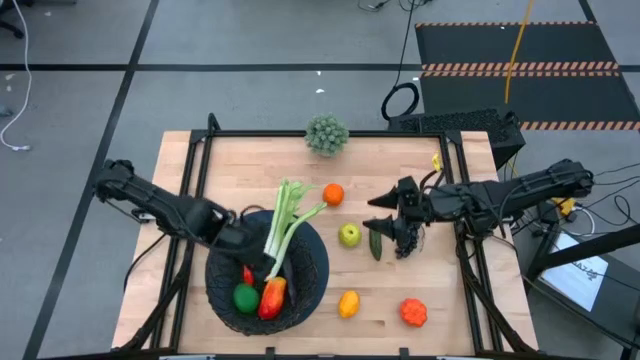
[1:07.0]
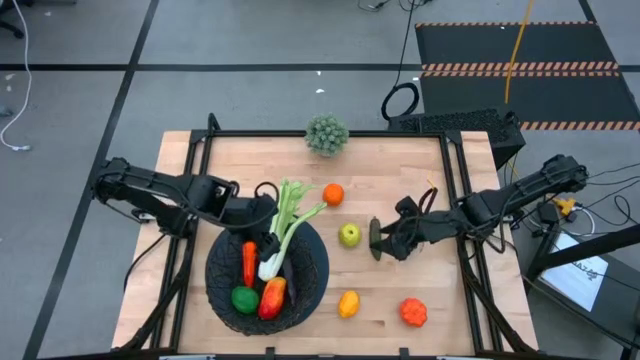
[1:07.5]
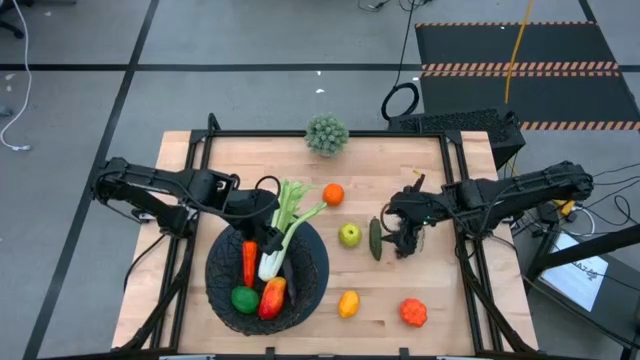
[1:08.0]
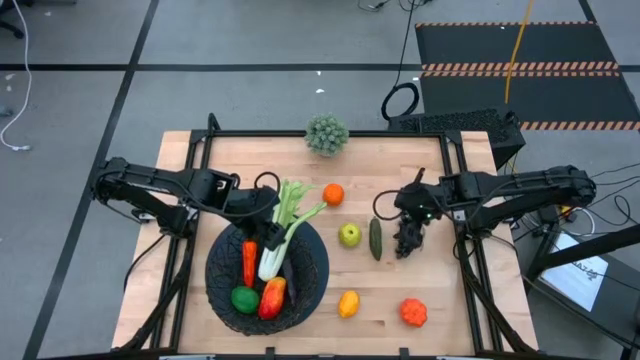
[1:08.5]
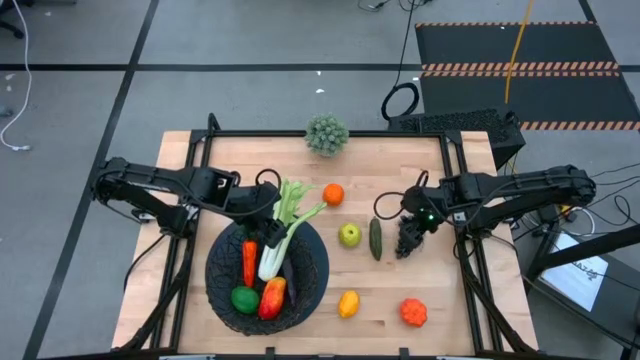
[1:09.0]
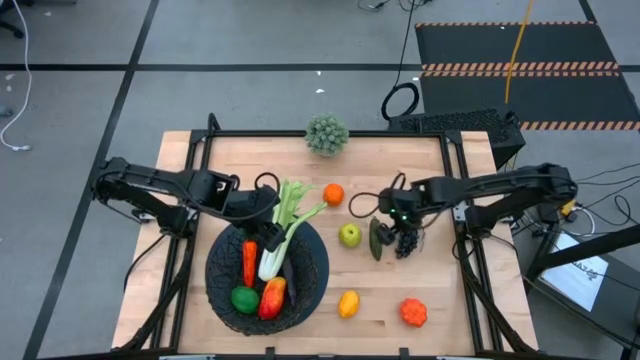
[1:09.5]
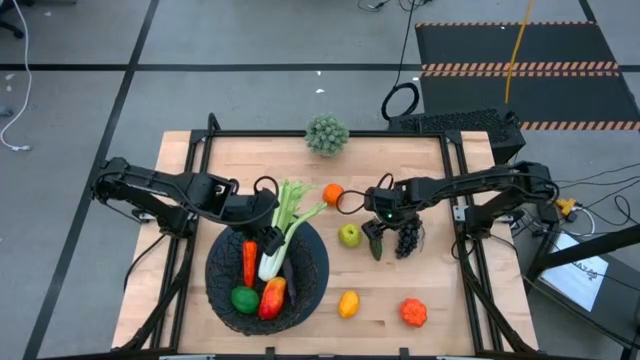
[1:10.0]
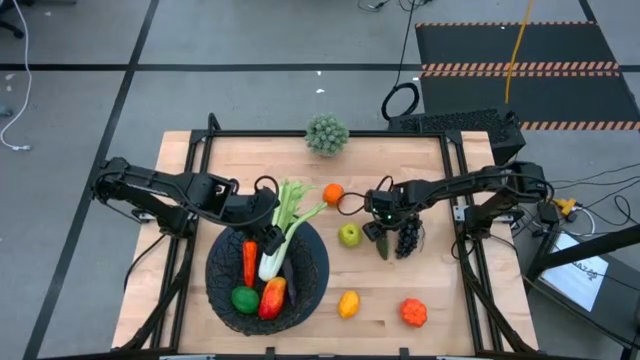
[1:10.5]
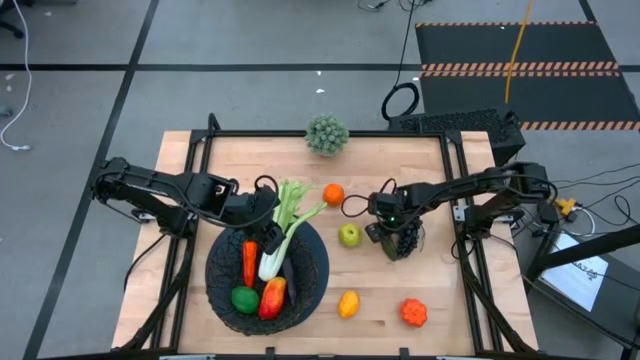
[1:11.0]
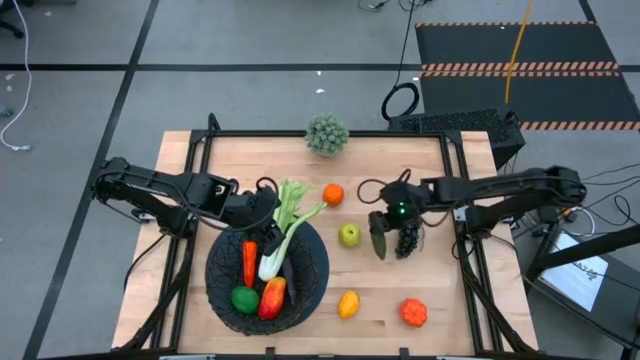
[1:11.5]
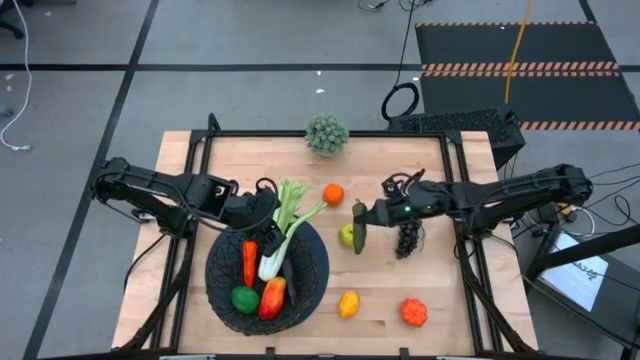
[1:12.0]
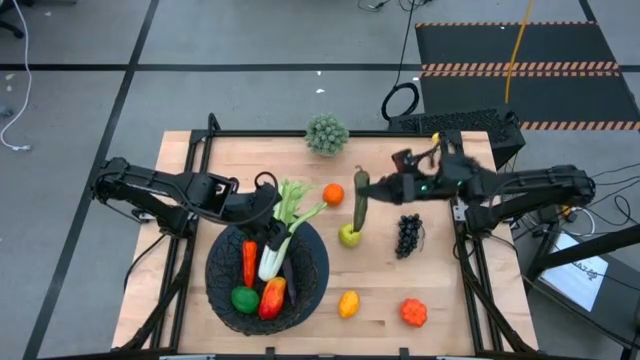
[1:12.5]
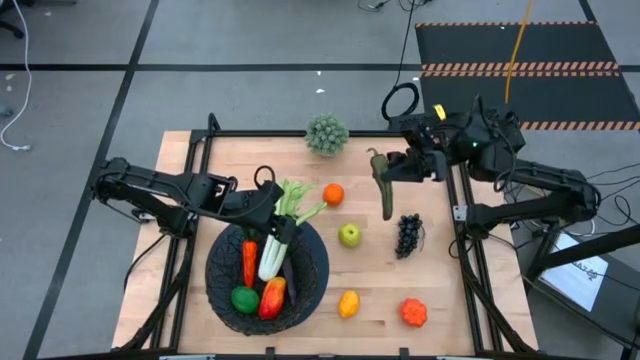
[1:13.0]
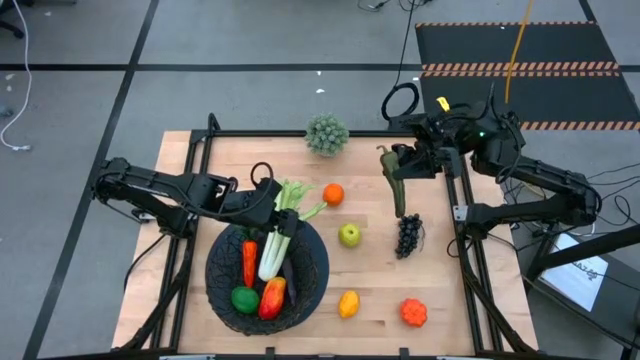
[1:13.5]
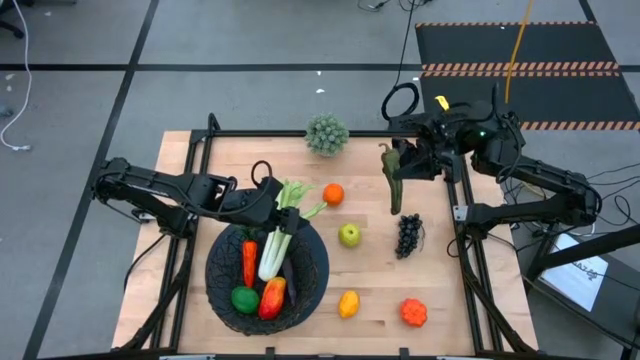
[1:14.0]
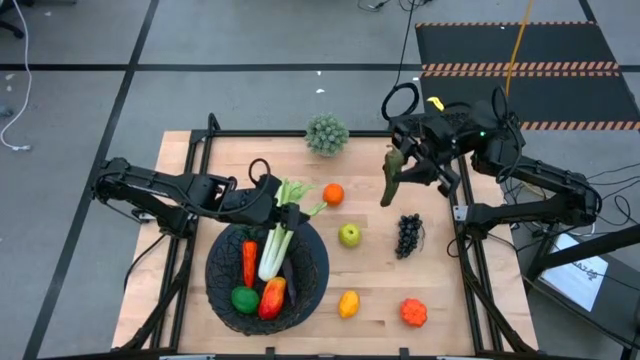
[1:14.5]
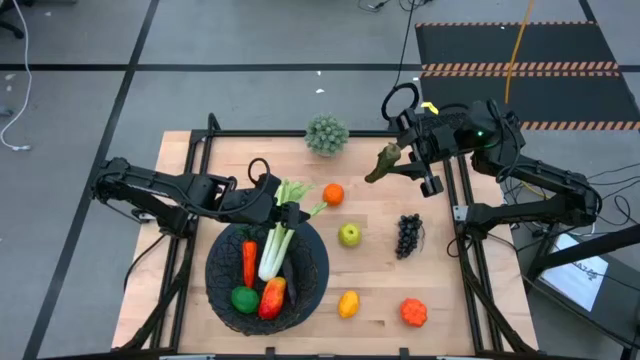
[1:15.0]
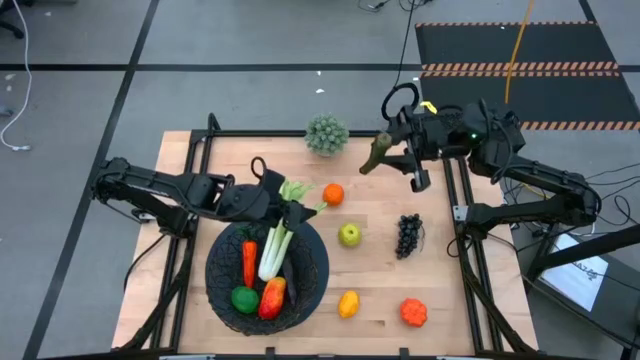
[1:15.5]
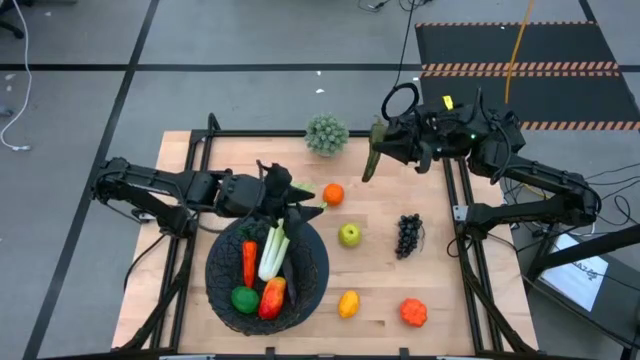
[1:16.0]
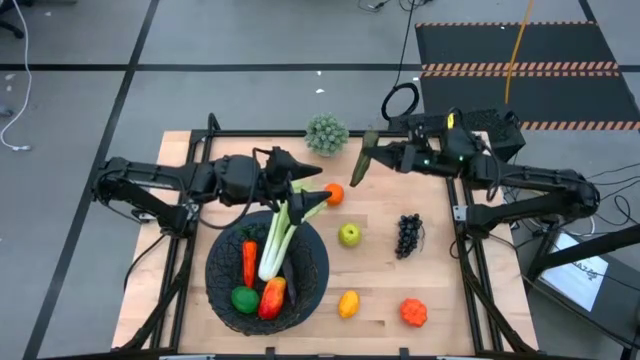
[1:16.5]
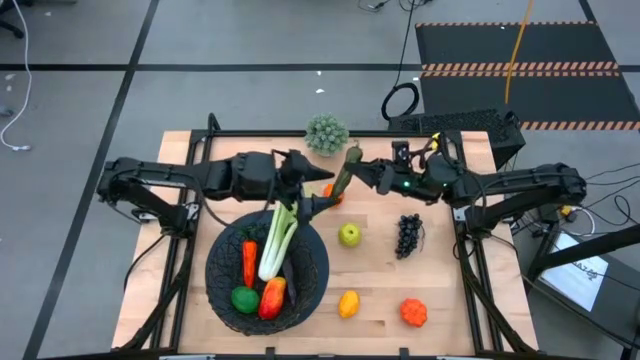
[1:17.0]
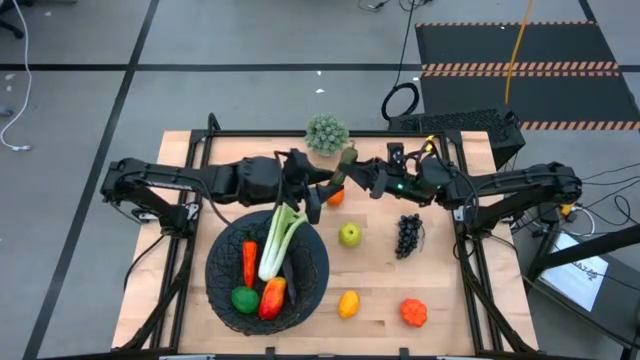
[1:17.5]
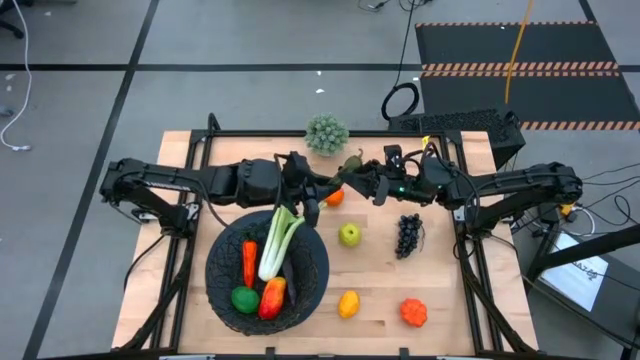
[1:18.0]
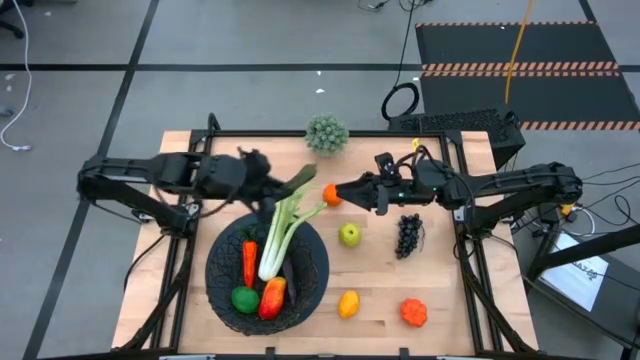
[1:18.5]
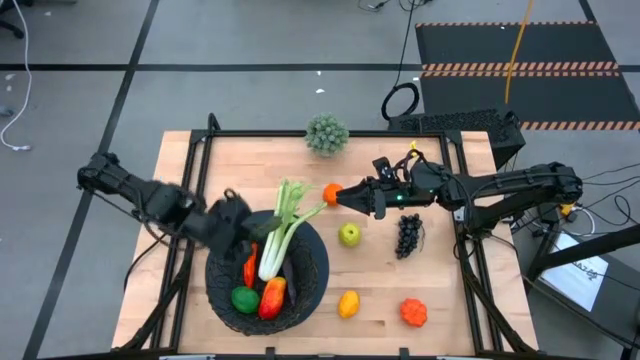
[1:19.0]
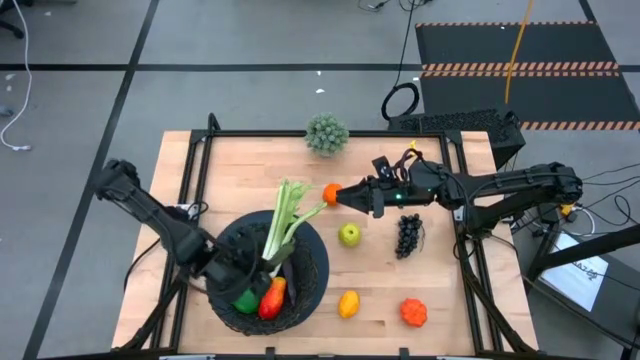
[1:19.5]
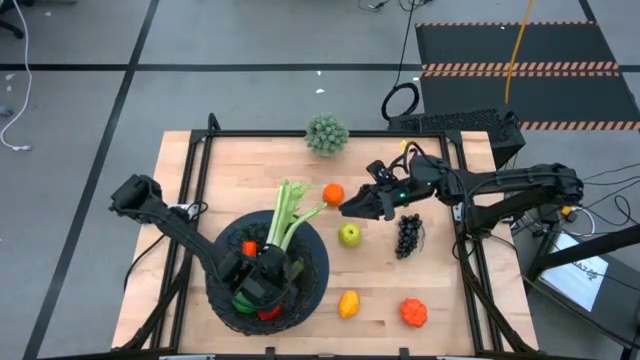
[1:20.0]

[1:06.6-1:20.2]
Task: Build produce basket
Put the green chili pepper into the black wire basket

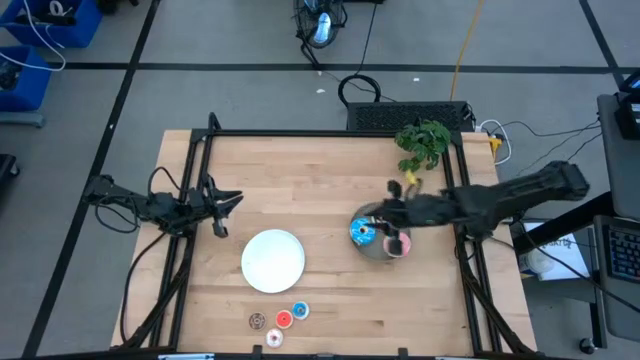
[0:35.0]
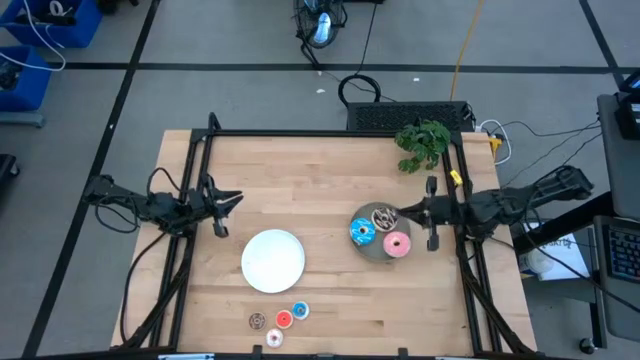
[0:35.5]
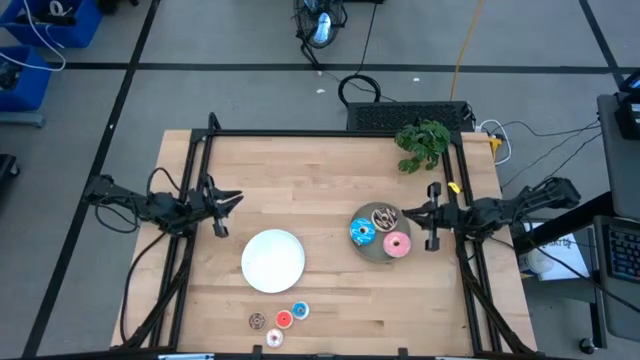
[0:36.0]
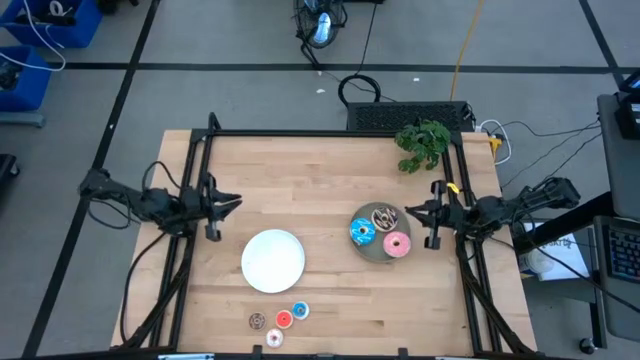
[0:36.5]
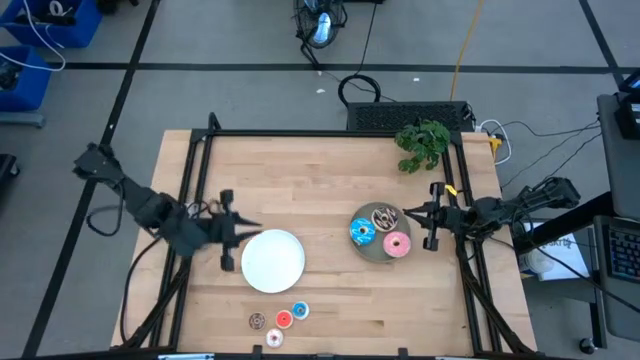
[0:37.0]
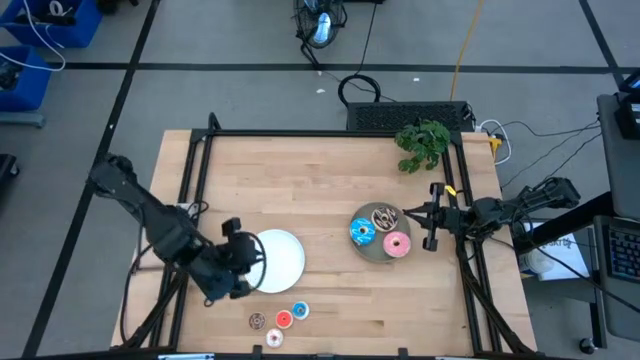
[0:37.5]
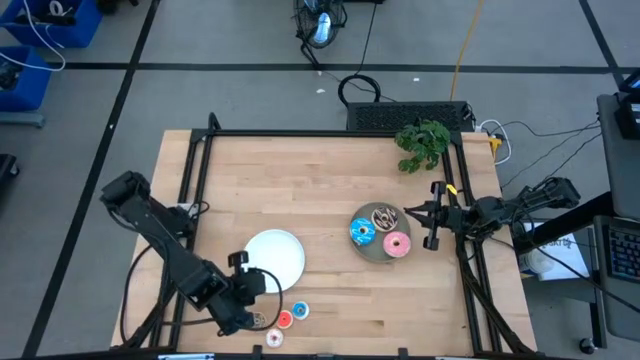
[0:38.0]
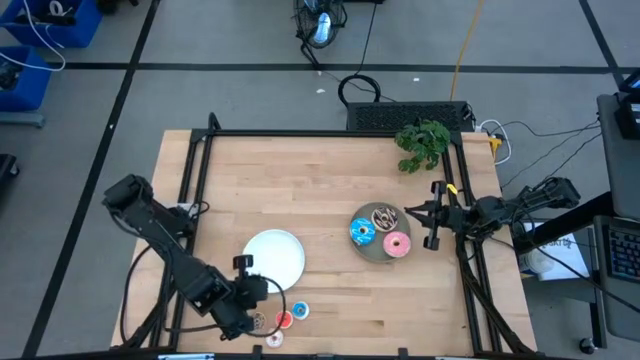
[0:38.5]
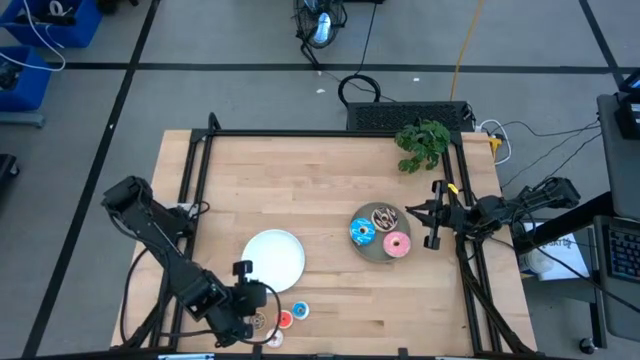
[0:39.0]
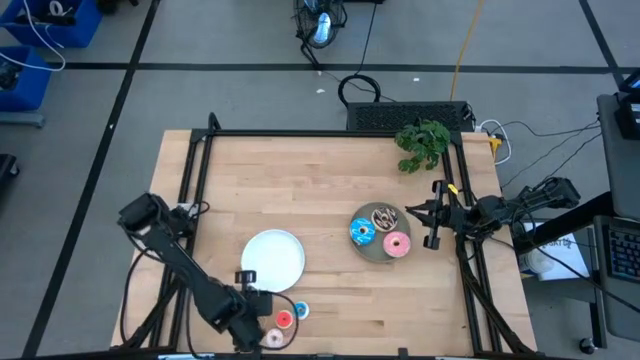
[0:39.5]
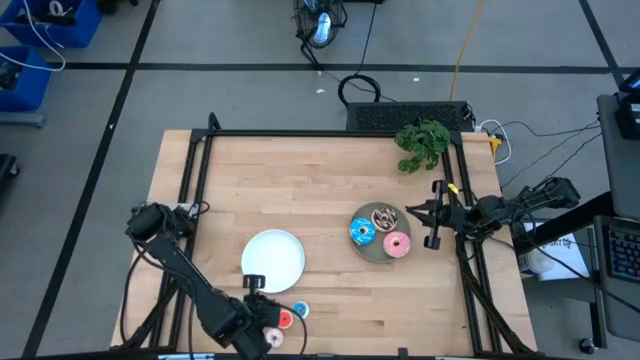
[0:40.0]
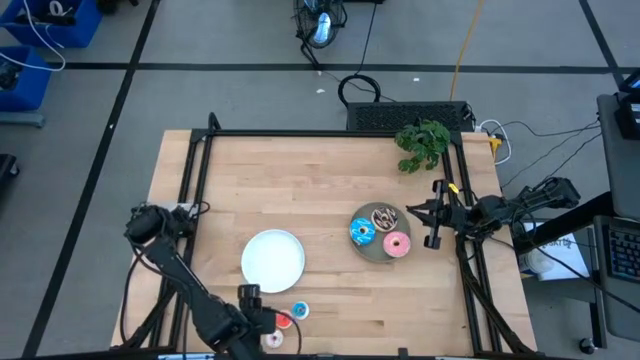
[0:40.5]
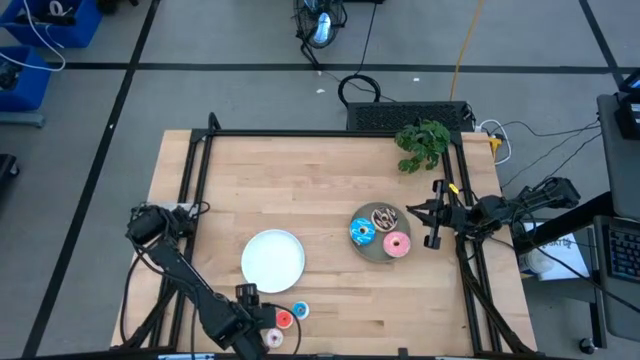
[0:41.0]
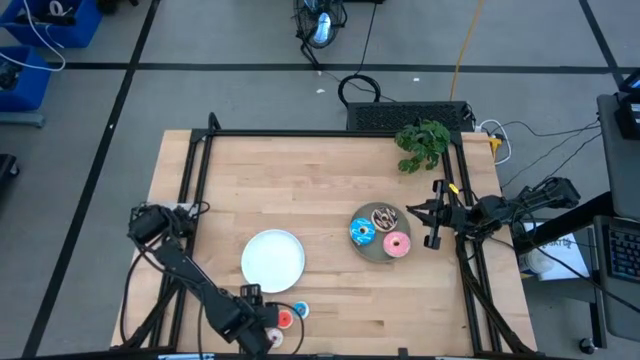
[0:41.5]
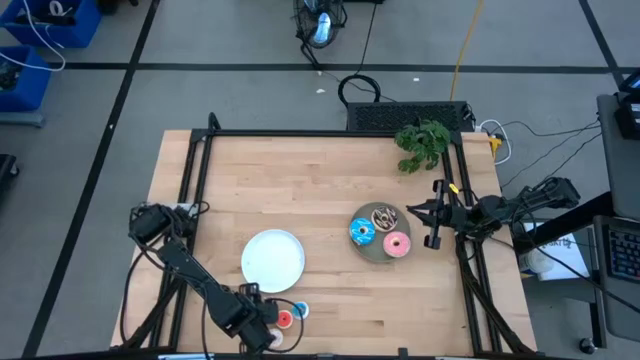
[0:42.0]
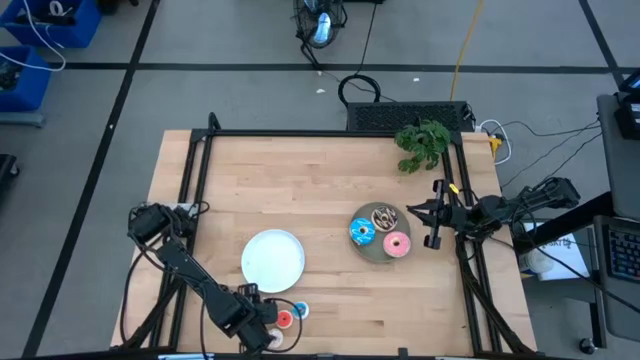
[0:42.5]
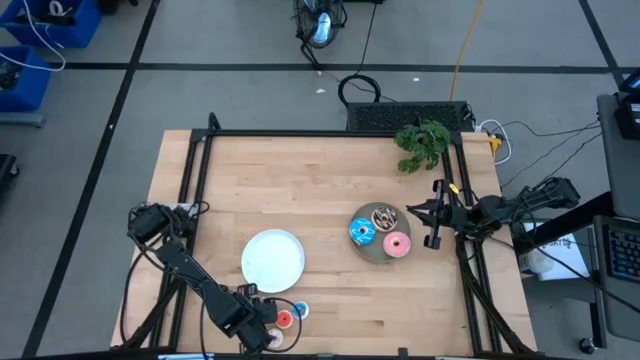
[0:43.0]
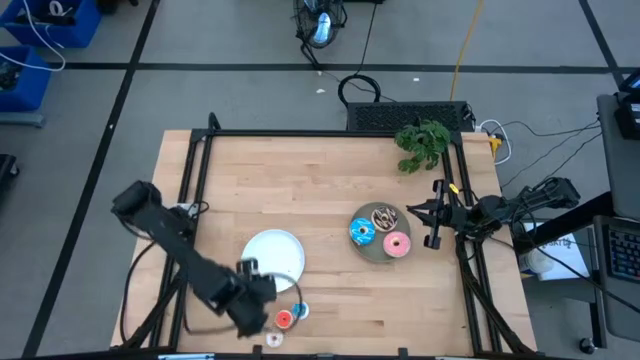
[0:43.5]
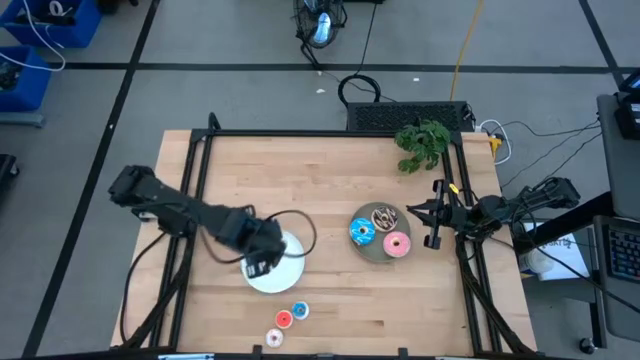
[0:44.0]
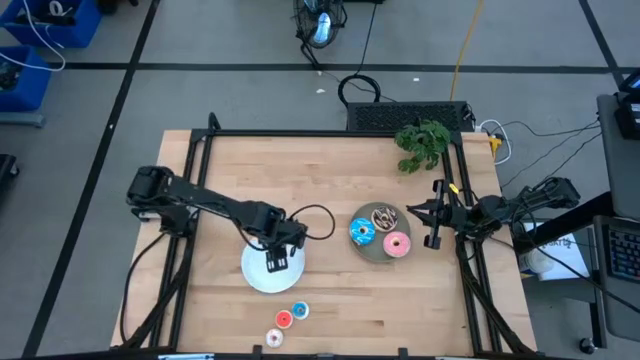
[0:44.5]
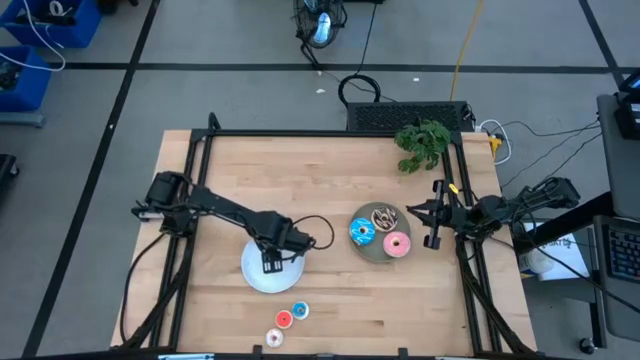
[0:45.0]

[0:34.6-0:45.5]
Task: Pick & Place donuts
Put the brown donut on the white plate
